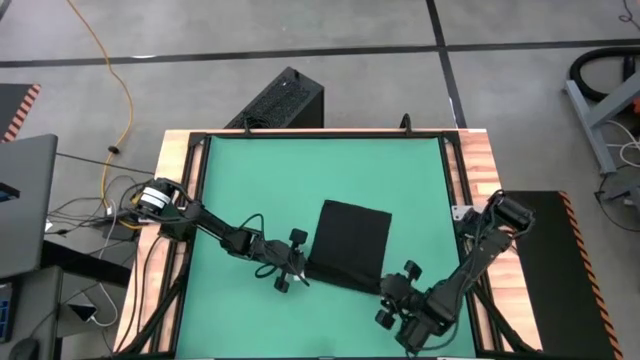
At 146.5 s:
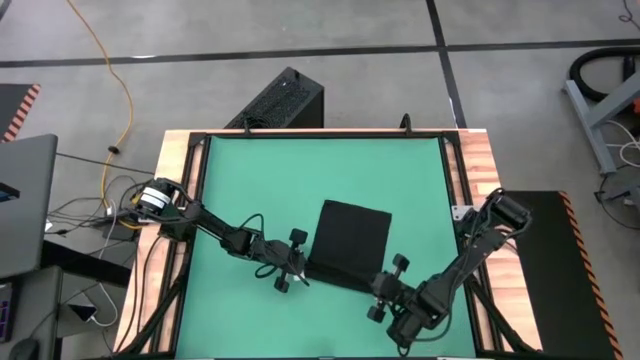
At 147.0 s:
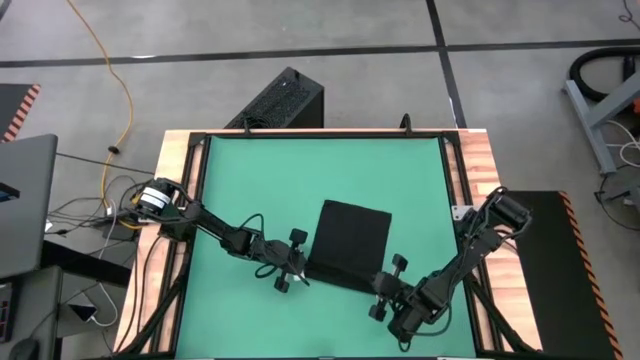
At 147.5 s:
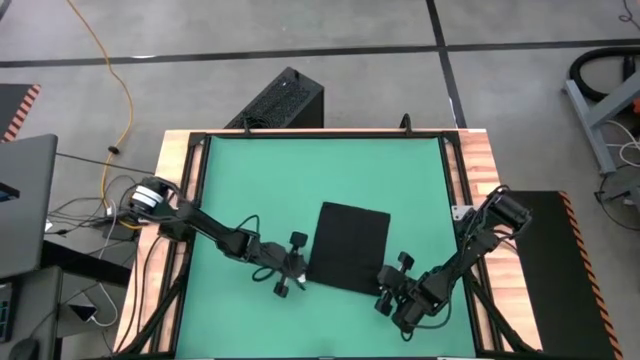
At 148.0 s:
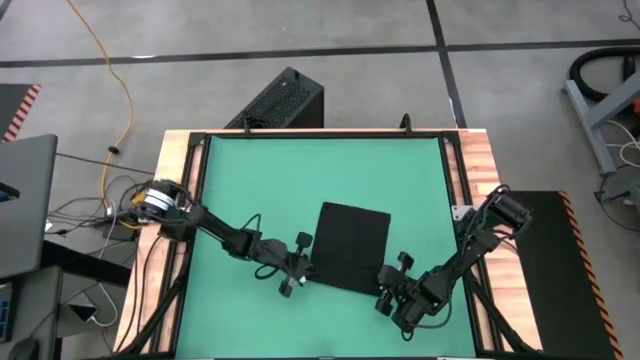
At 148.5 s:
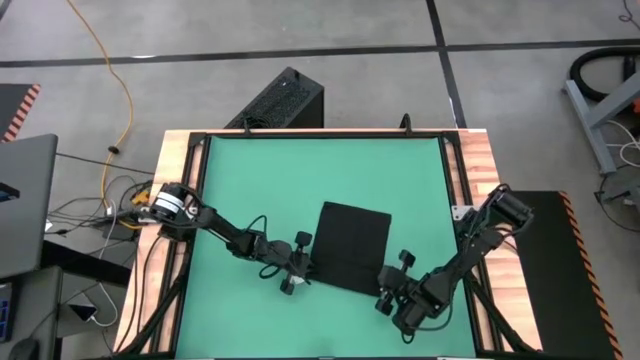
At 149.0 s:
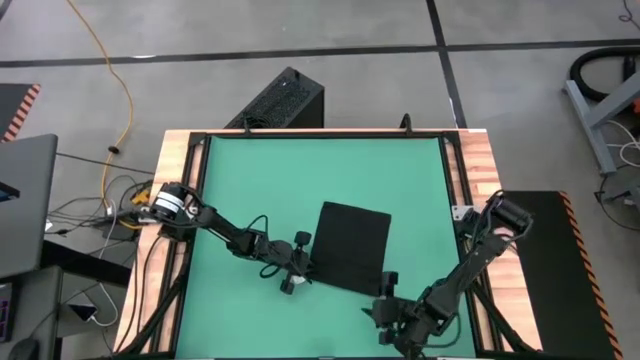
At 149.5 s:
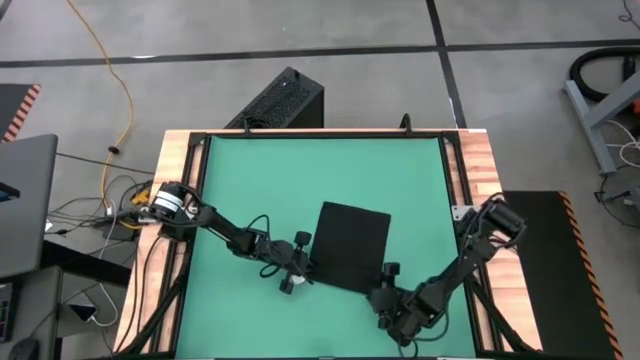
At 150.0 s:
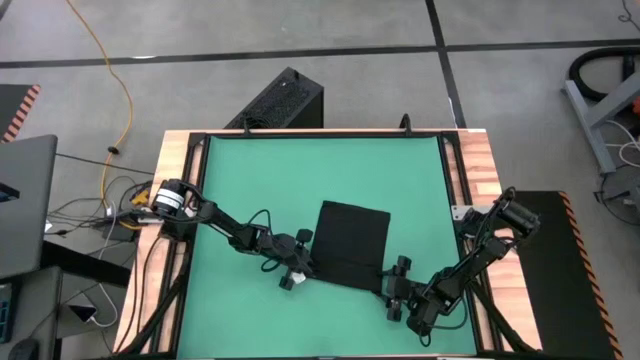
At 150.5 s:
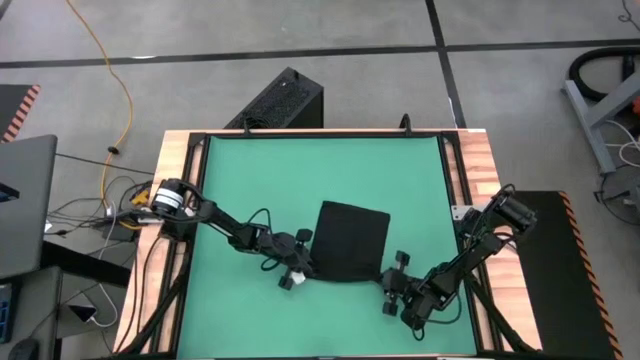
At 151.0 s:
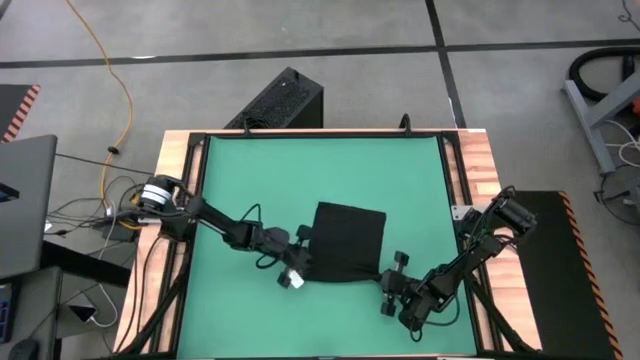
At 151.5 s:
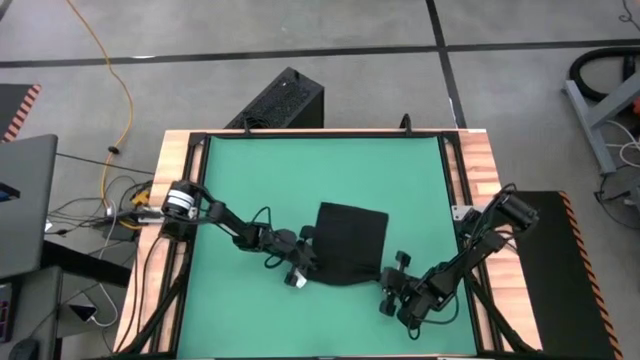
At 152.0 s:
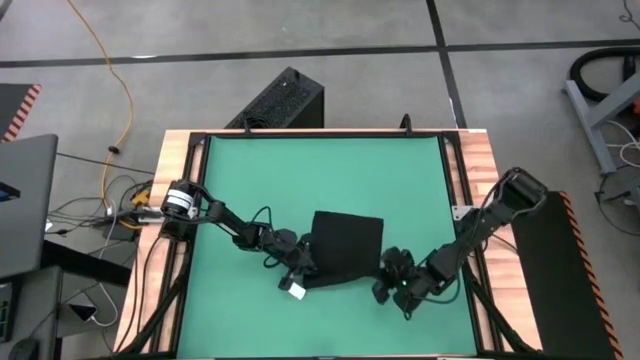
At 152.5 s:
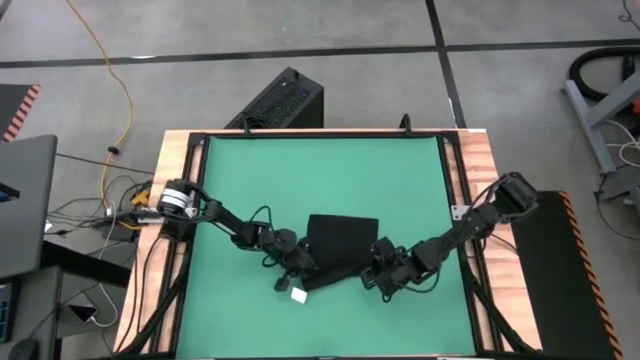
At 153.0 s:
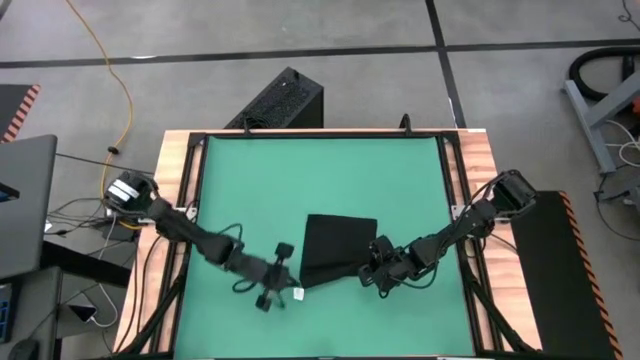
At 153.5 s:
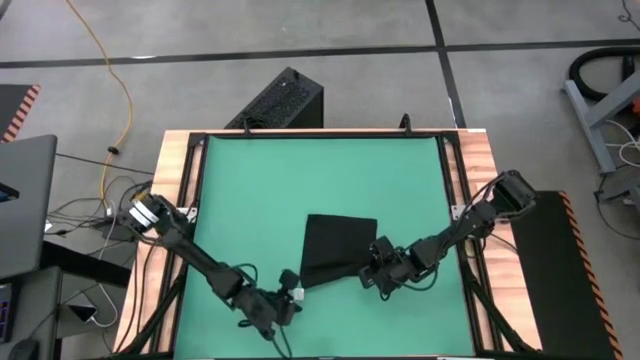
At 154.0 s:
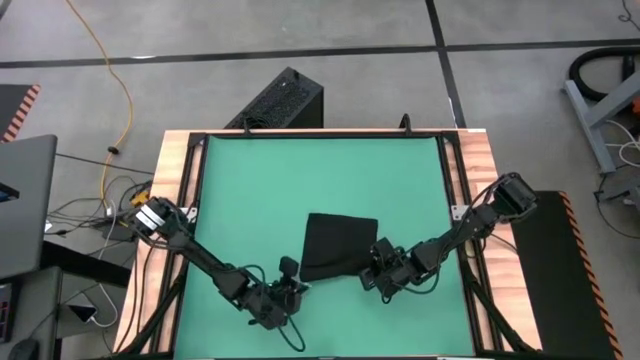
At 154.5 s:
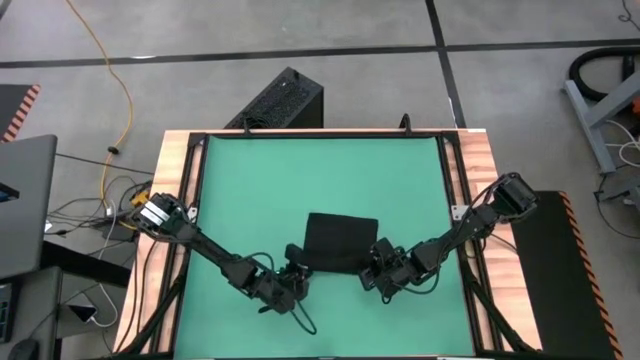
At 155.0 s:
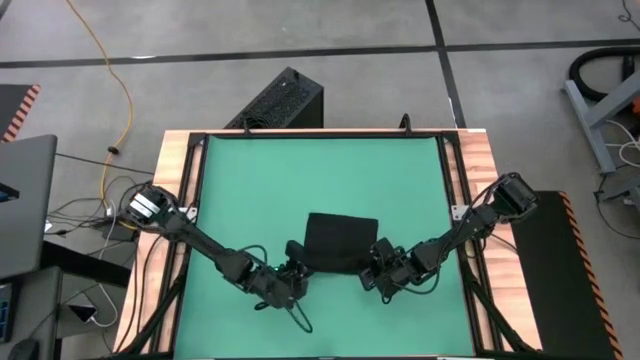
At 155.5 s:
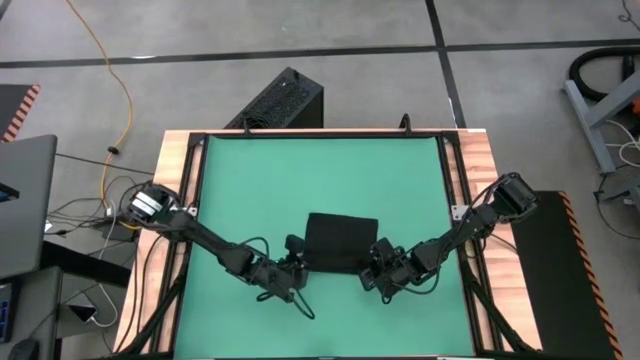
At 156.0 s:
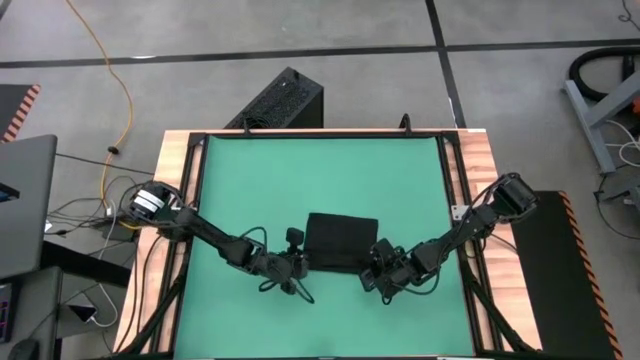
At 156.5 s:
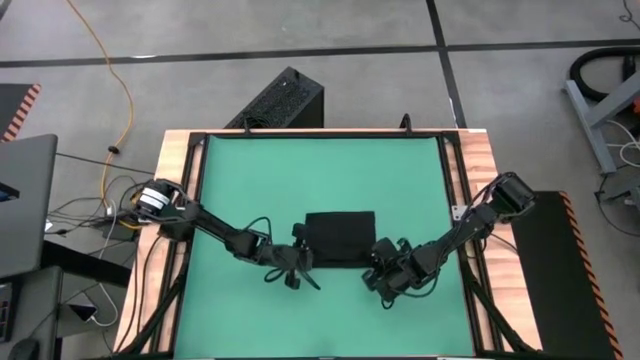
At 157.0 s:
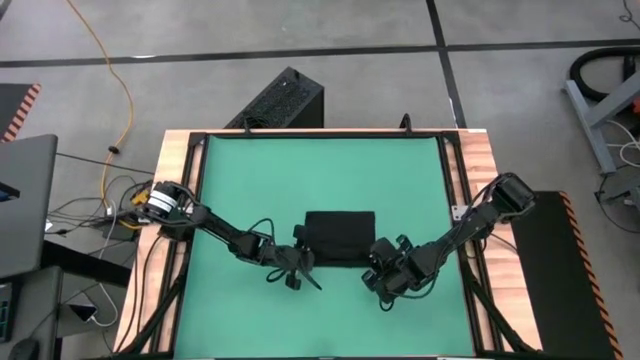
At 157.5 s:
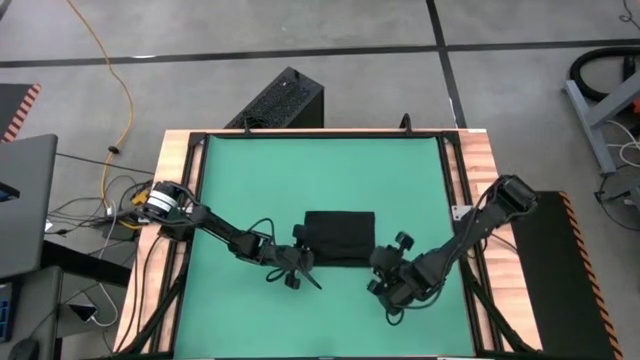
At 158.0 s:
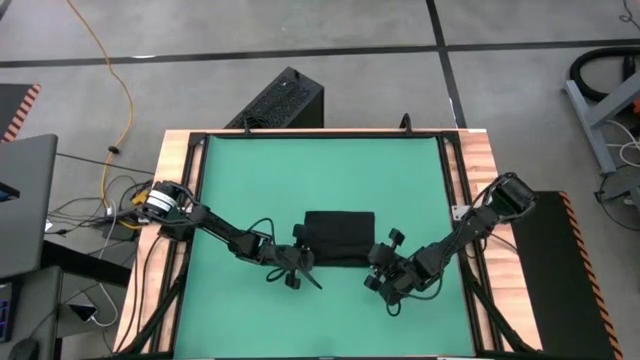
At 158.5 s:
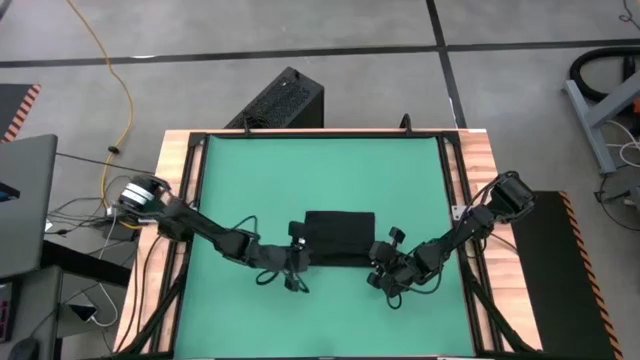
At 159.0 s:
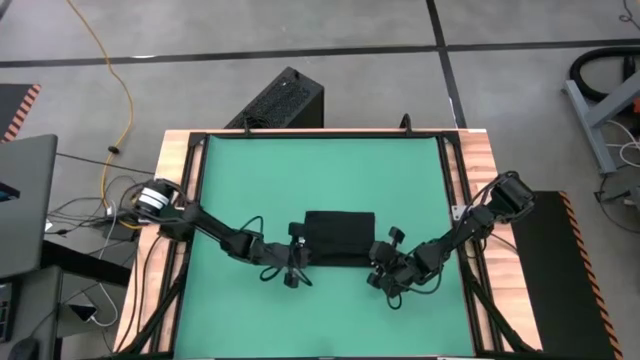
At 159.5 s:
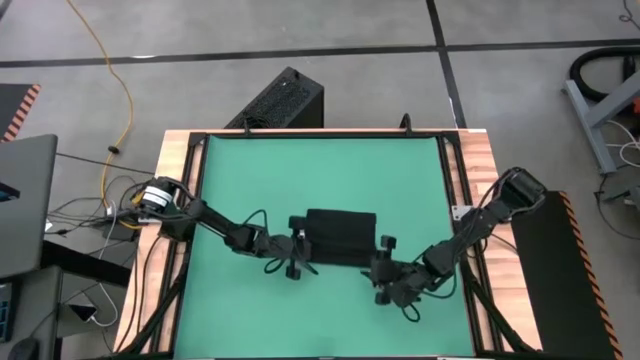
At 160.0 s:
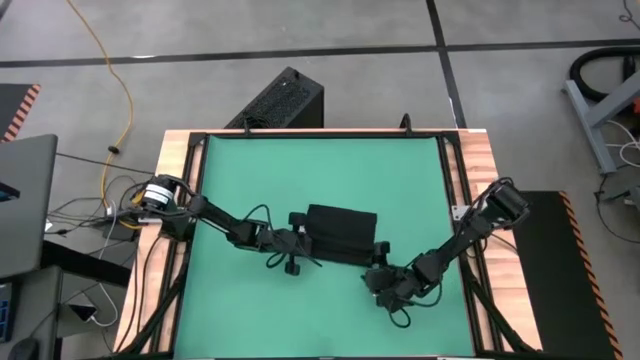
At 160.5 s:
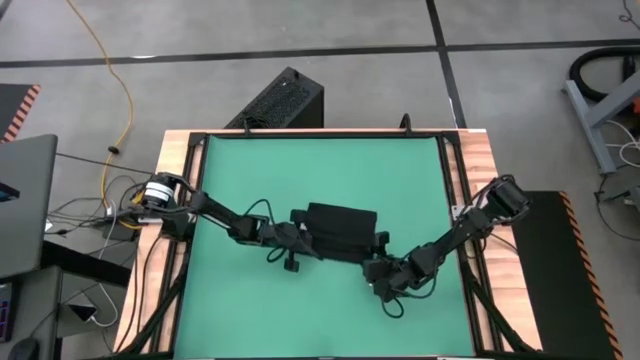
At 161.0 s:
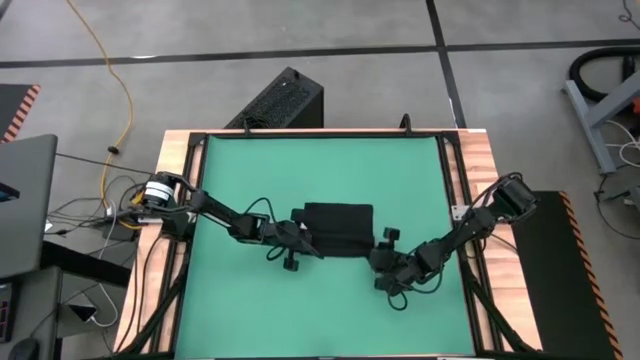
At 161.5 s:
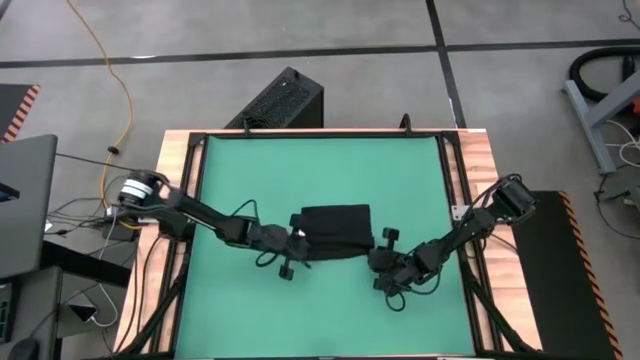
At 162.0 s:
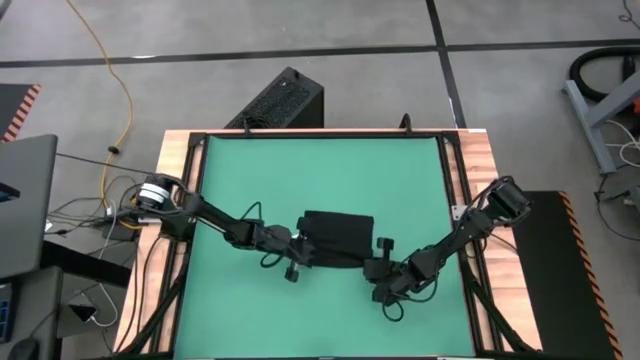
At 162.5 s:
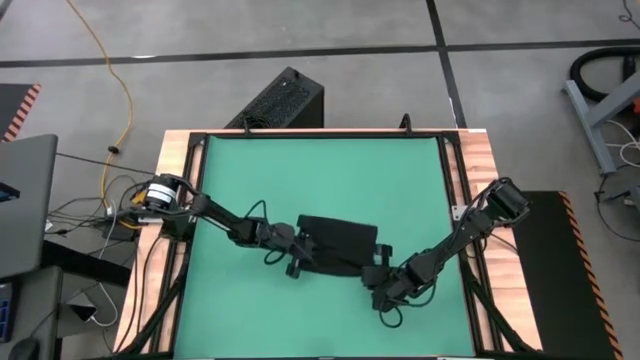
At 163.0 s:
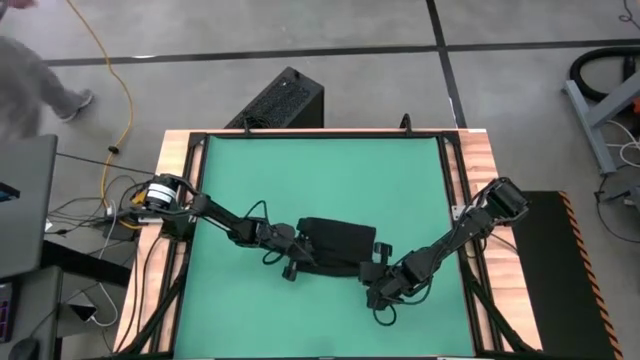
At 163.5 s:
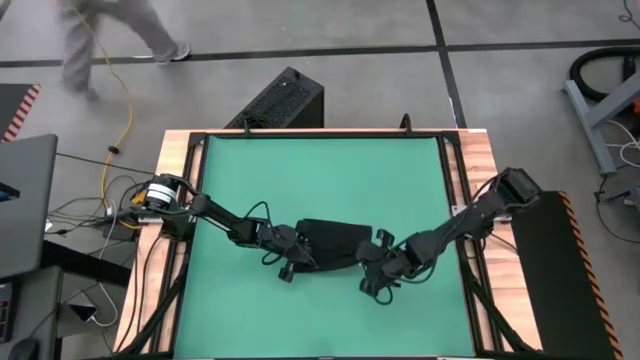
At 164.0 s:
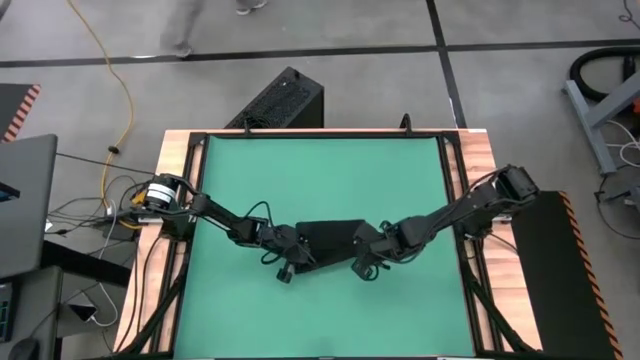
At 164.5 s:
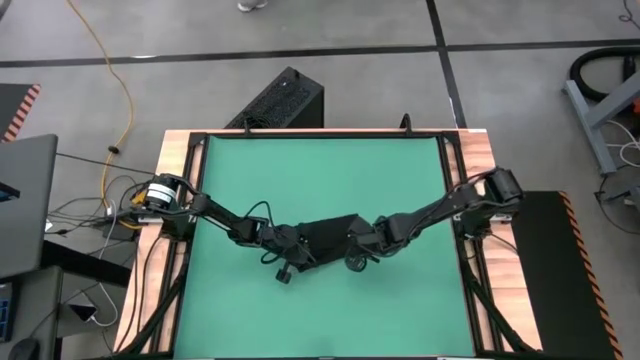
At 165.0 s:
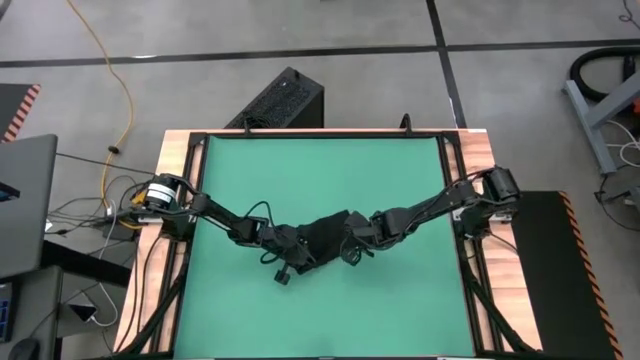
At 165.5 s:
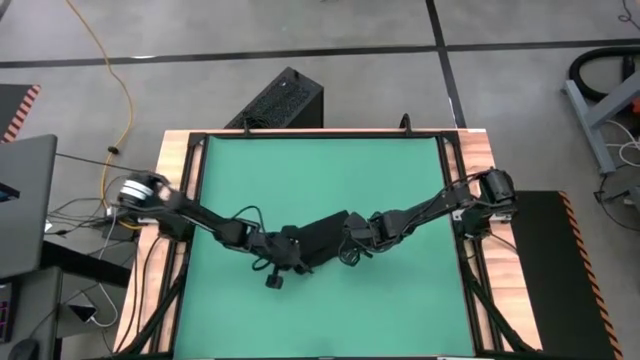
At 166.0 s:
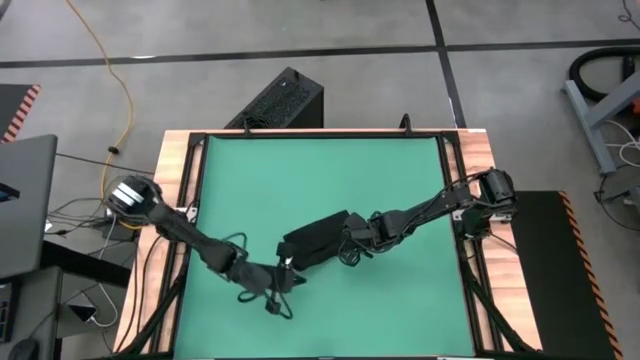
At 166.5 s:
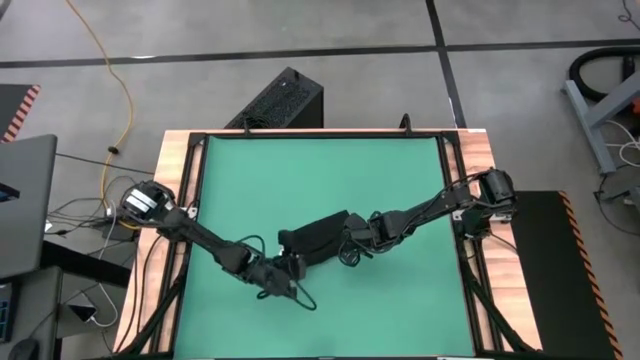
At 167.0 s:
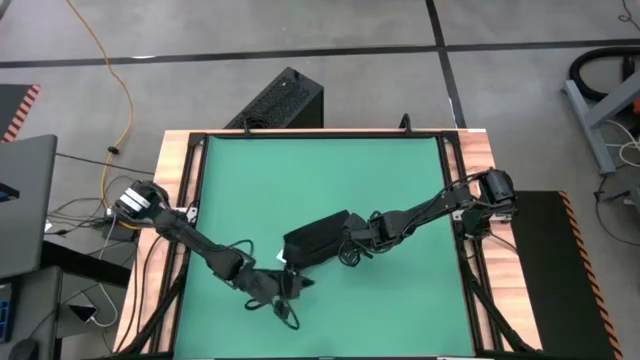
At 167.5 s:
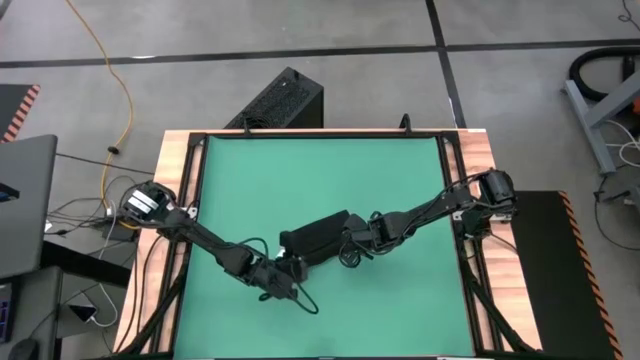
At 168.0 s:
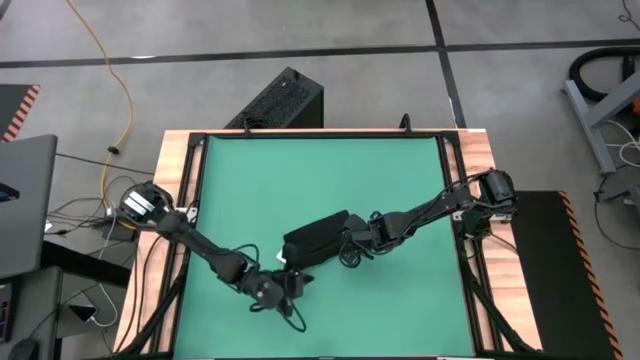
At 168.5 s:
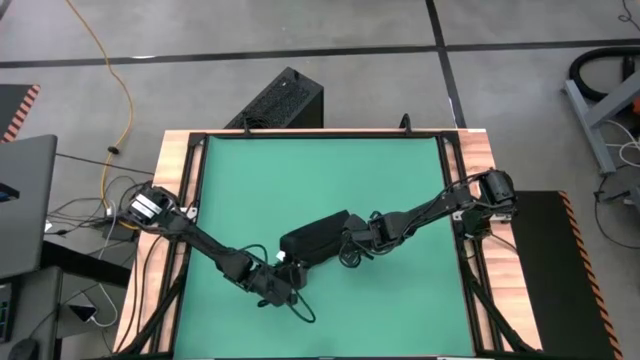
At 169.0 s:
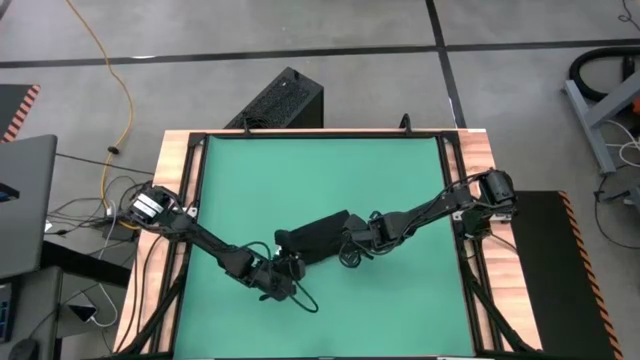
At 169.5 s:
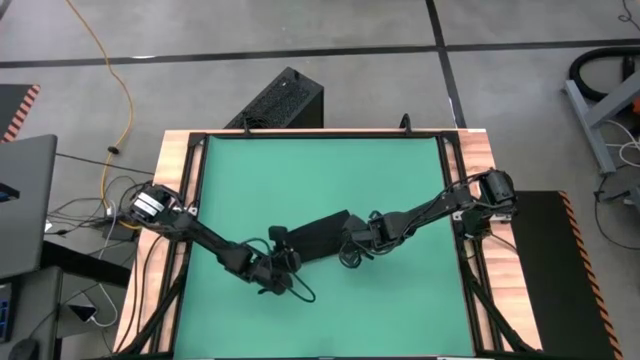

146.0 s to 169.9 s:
Task: Roll towel into tight, uniform cylinder
Roll the black towel
